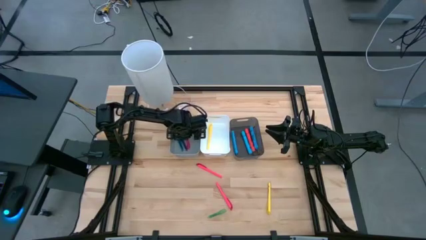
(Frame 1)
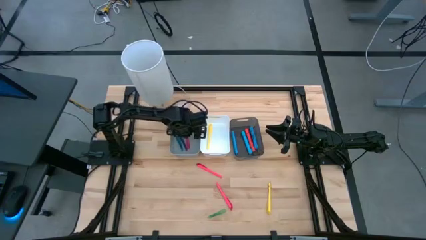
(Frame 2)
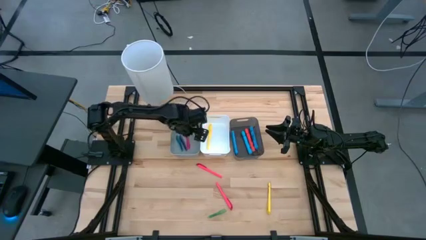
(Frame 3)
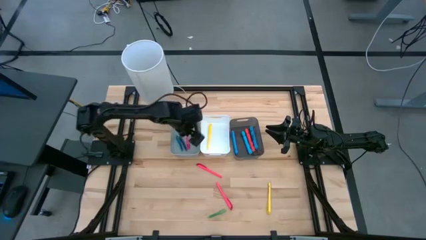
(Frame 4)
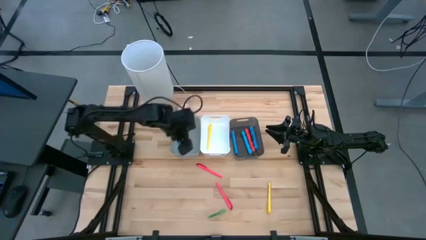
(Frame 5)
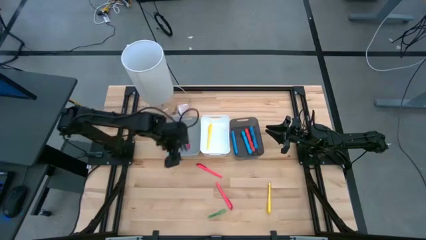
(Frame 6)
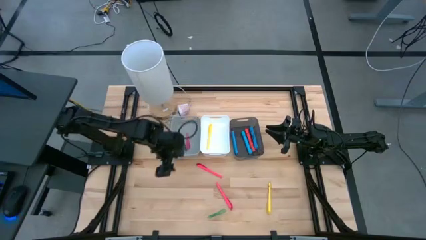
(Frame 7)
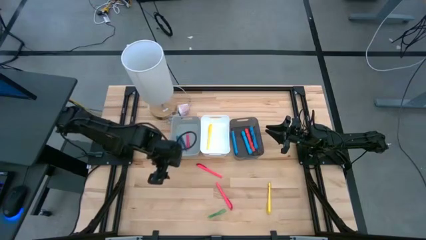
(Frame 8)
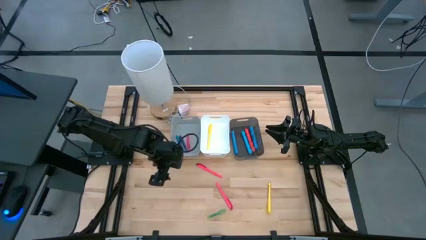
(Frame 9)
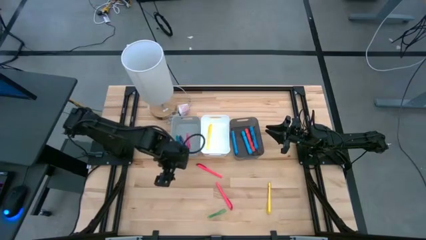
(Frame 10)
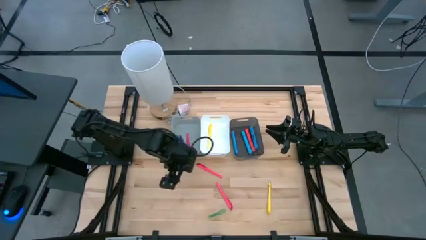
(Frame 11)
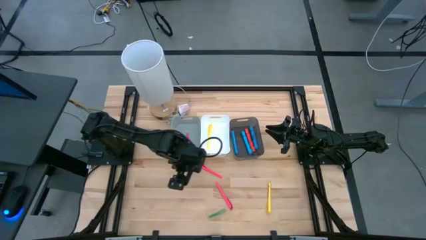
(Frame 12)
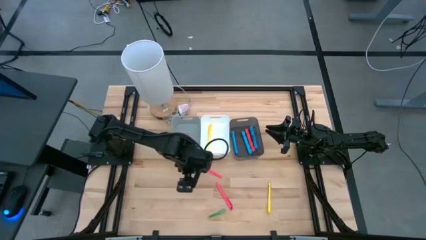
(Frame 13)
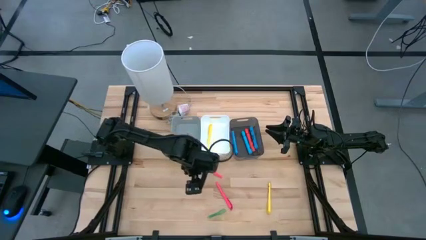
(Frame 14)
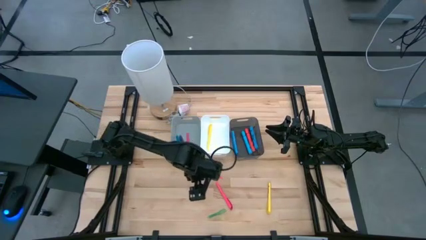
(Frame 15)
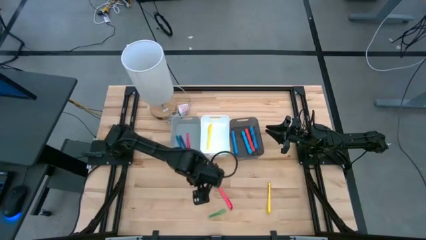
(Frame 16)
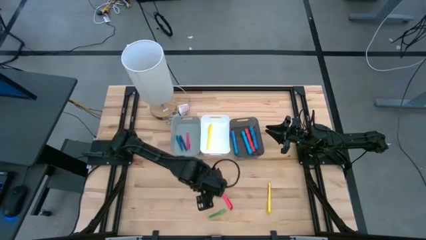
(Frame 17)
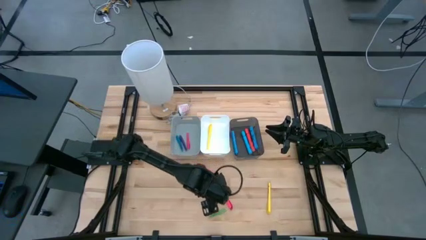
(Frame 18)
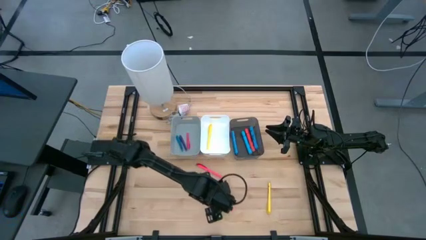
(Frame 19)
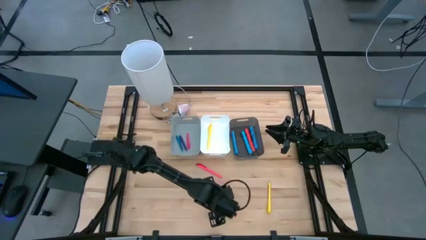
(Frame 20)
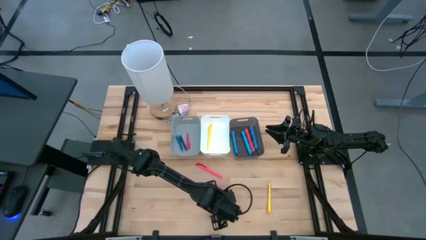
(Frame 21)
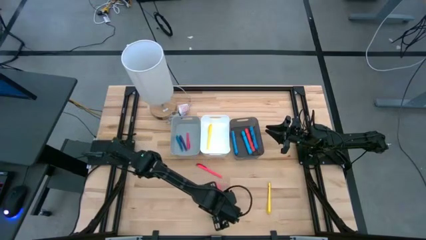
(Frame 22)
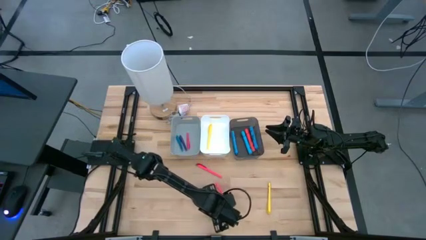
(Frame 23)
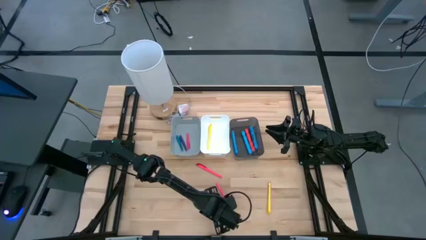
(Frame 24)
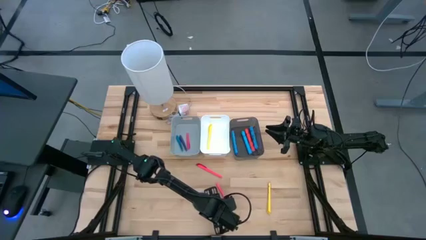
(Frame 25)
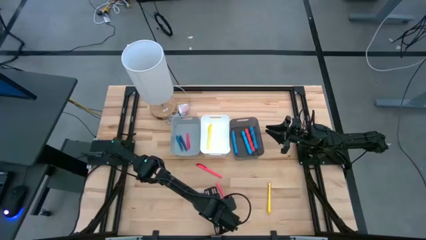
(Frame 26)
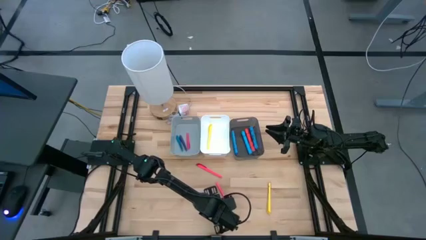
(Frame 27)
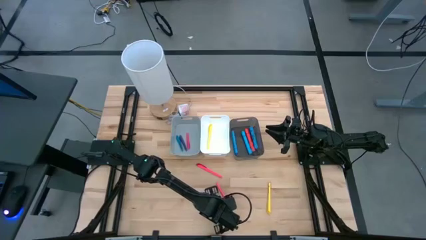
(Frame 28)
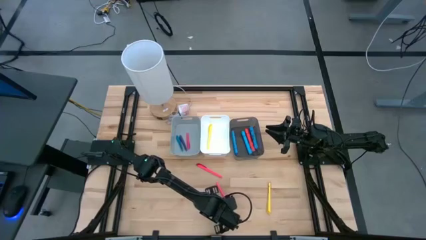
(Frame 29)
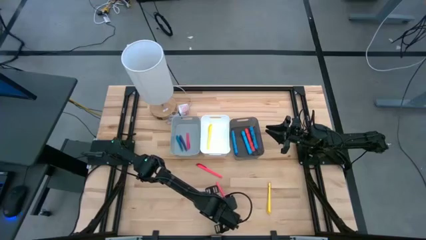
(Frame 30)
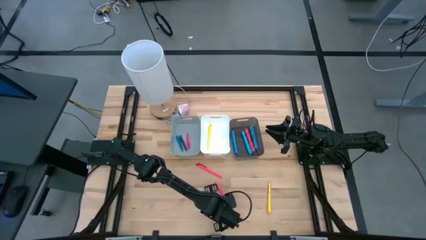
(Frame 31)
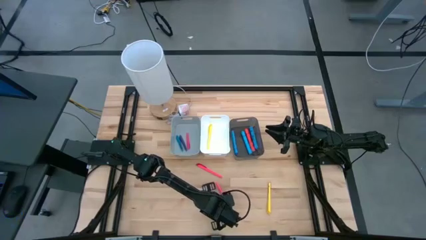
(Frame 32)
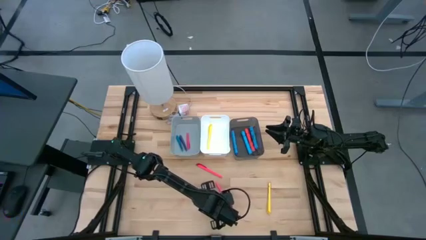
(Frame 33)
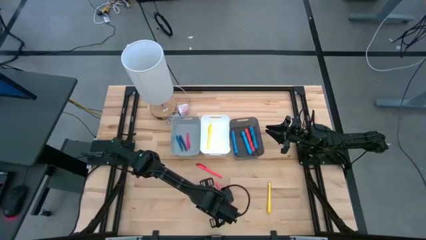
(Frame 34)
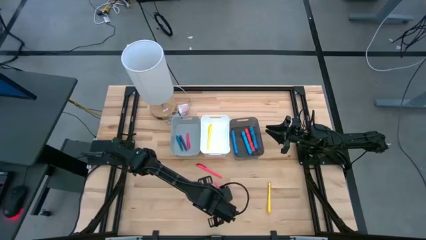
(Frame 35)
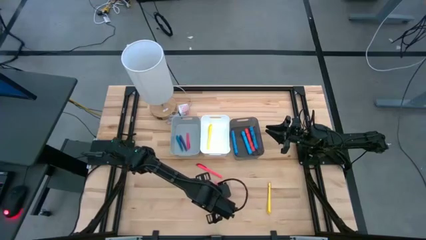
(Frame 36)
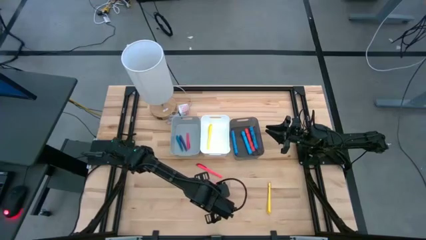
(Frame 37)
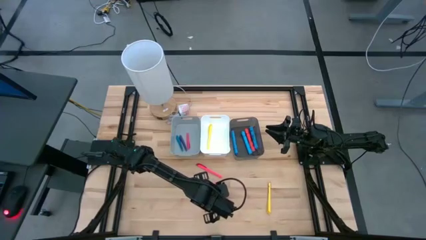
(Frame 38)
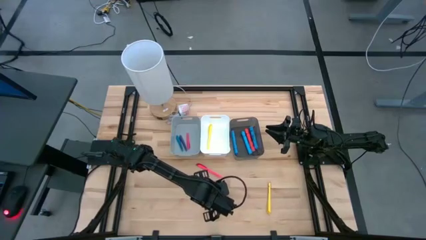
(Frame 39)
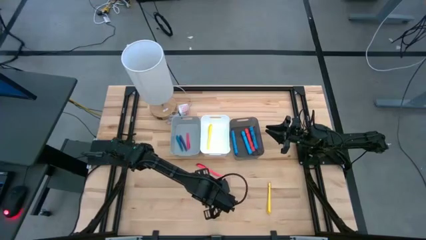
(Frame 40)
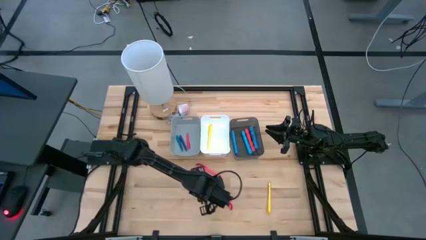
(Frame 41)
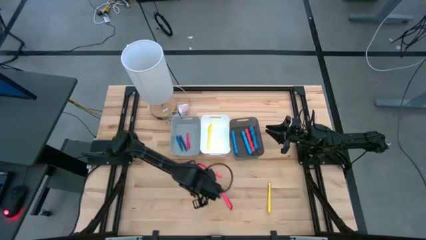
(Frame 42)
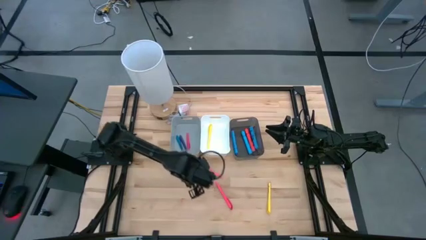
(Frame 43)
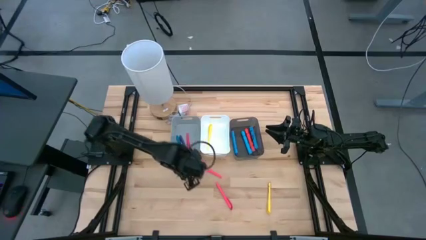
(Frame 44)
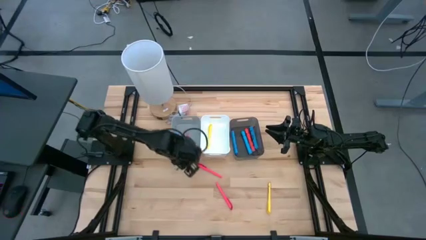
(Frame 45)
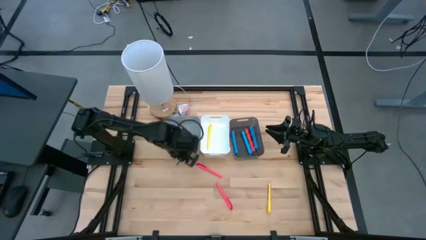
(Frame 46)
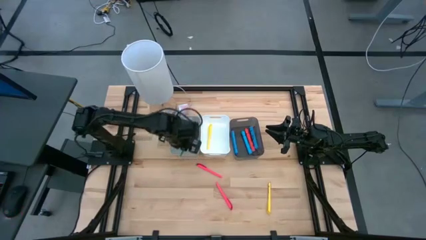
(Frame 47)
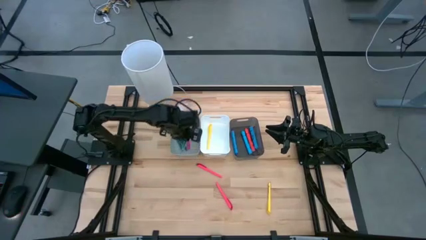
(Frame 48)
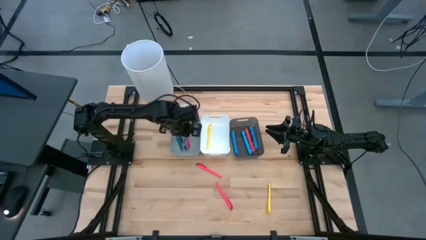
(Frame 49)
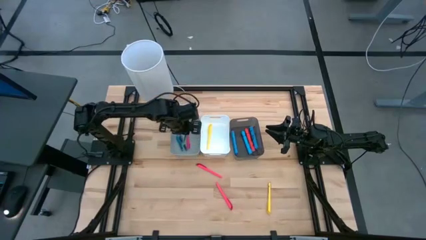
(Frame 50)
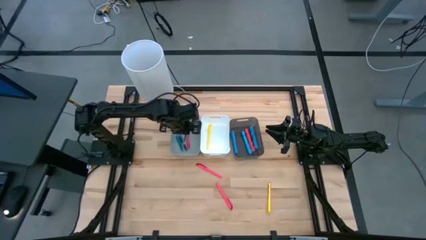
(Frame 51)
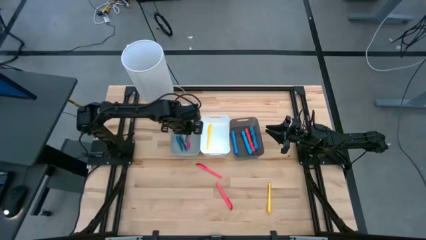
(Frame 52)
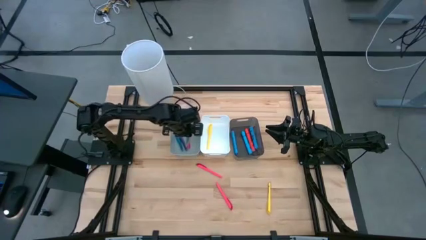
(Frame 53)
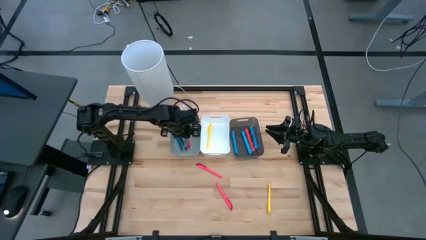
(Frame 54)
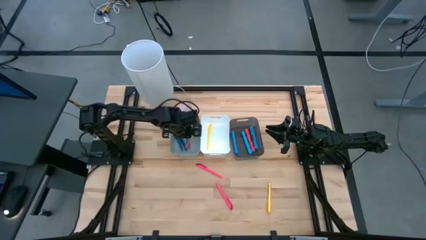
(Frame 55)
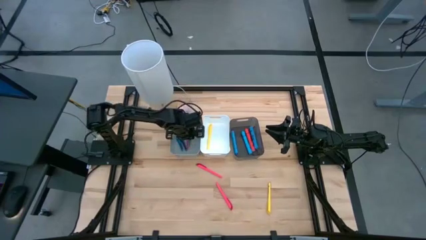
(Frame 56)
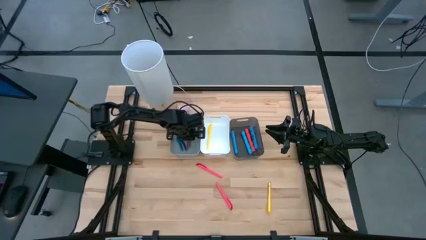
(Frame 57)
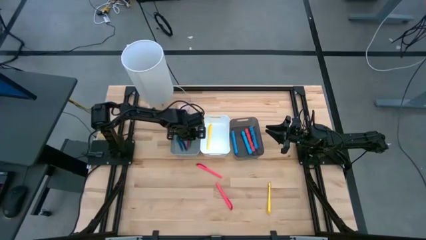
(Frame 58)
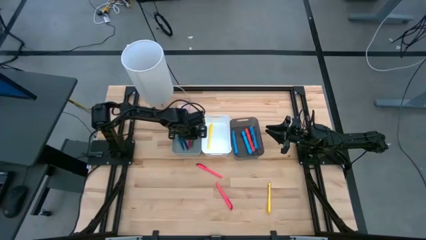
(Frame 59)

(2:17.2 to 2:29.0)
Task: Pick & Place Markers
Put the green pen into the gray bin

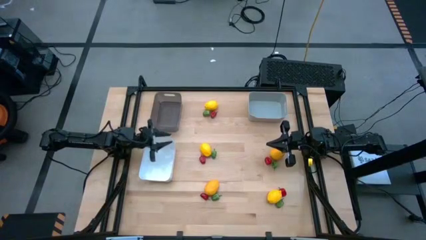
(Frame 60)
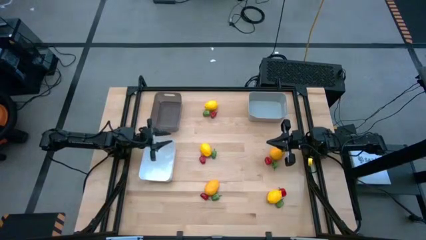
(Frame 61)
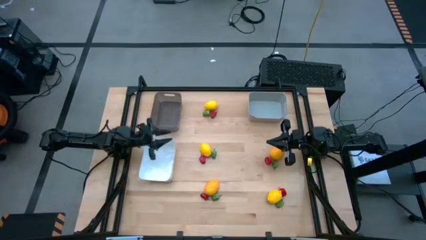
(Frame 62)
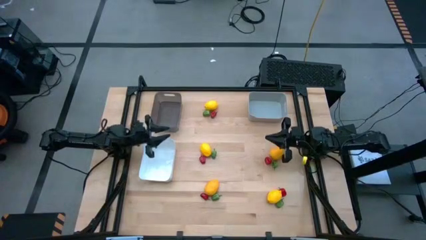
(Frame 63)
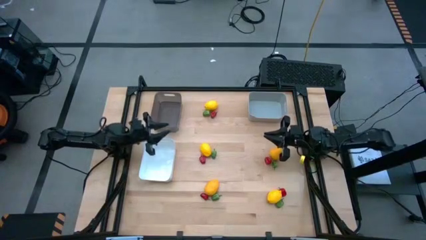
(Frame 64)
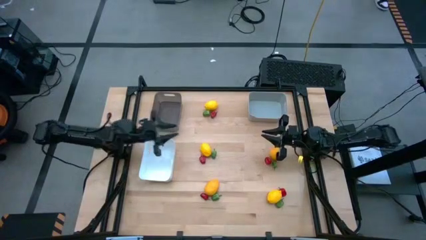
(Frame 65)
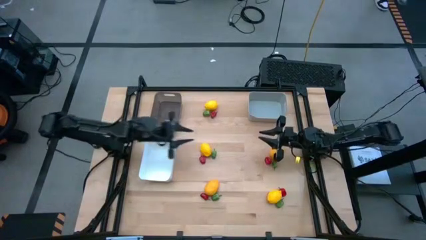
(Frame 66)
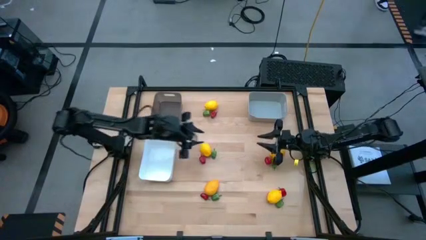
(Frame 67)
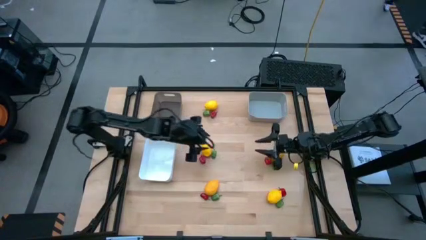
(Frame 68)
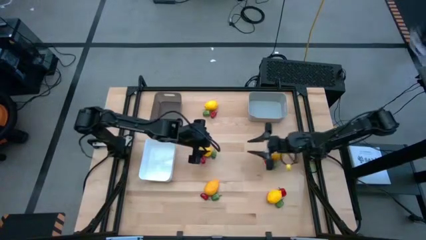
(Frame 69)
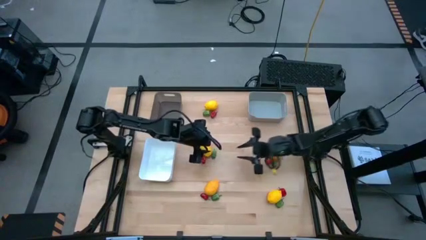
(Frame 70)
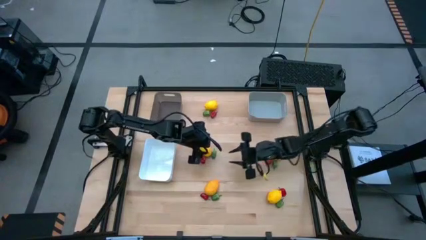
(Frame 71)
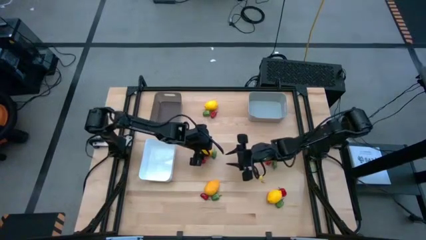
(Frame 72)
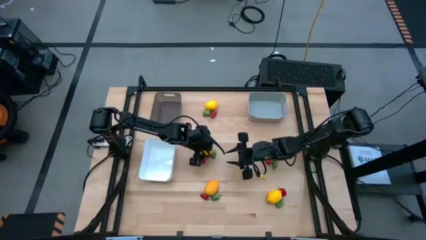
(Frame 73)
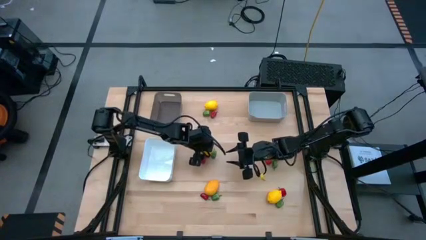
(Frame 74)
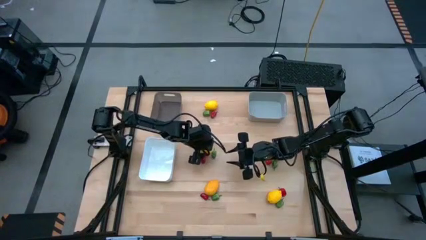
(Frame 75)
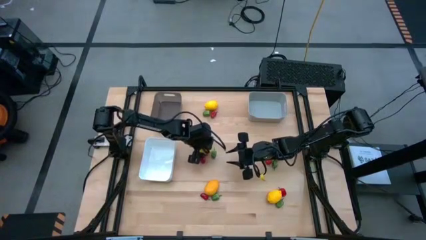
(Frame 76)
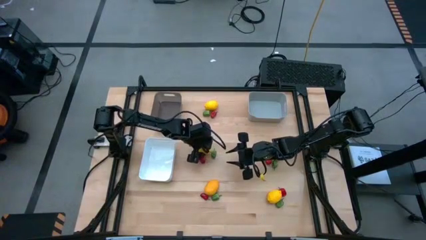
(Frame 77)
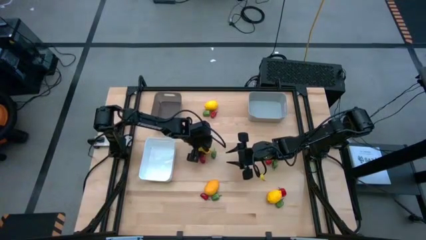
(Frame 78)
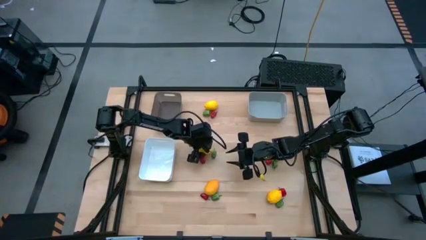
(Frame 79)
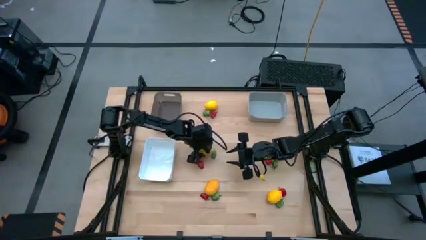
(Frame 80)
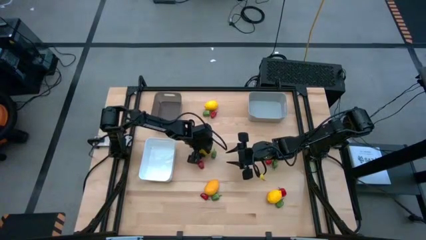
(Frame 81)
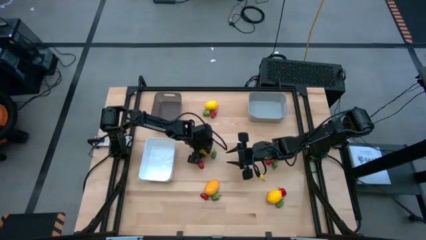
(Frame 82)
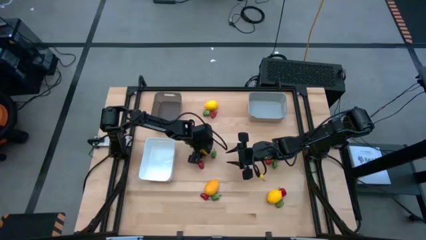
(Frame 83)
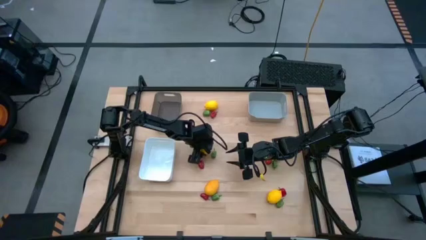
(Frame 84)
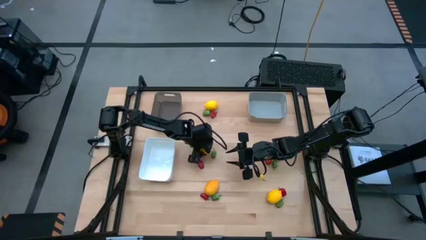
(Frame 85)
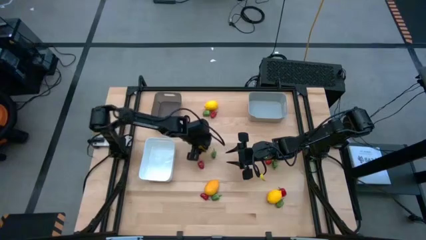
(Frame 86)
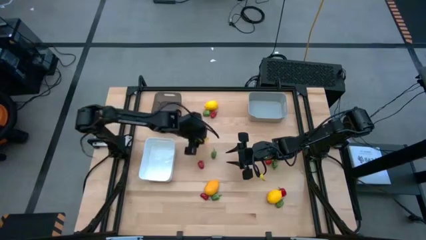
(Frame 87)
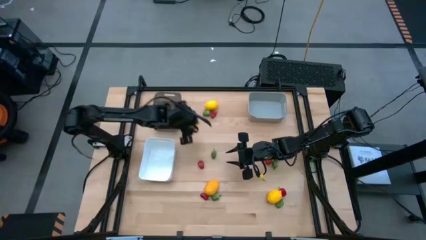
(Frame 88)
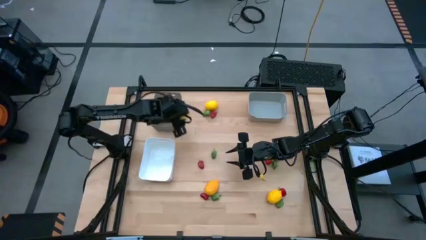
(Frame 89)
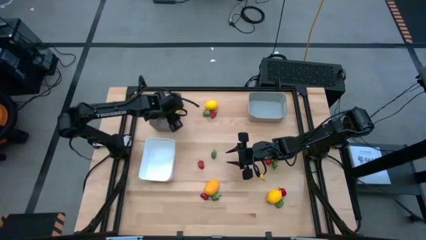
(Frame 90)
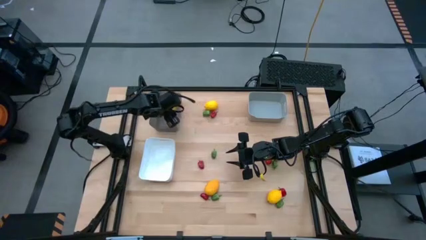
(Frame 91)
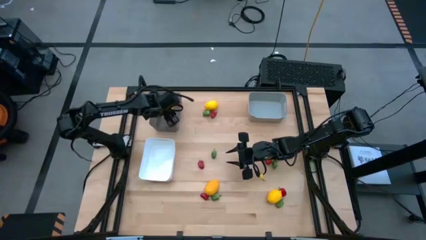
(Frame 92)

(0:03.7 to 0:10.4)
Task: Sort produce into baskets
Put the middle left yellow lemon into the black bin
